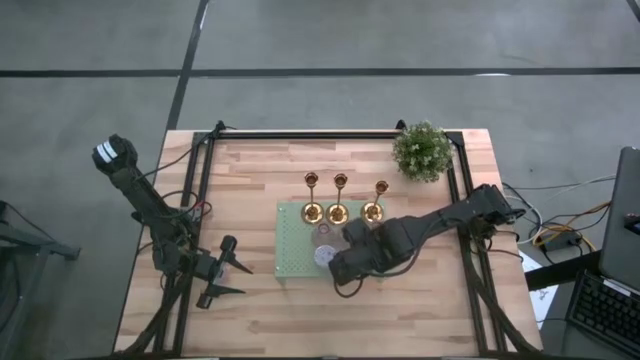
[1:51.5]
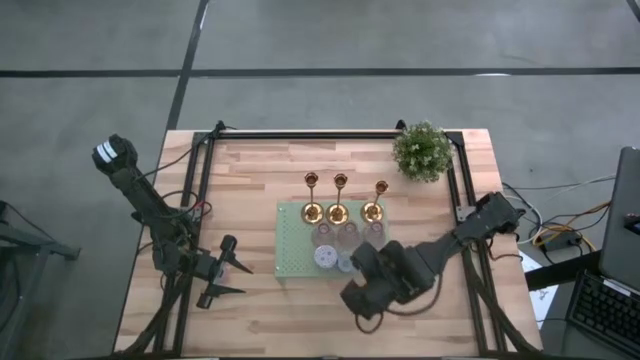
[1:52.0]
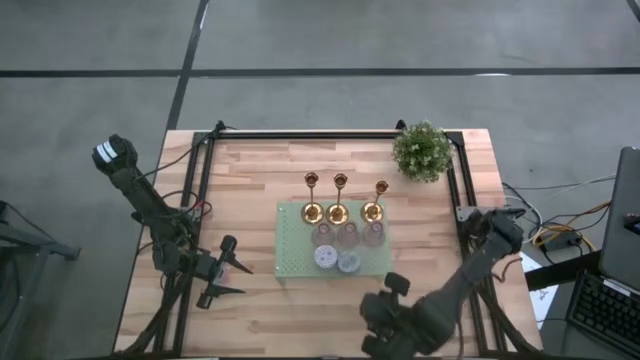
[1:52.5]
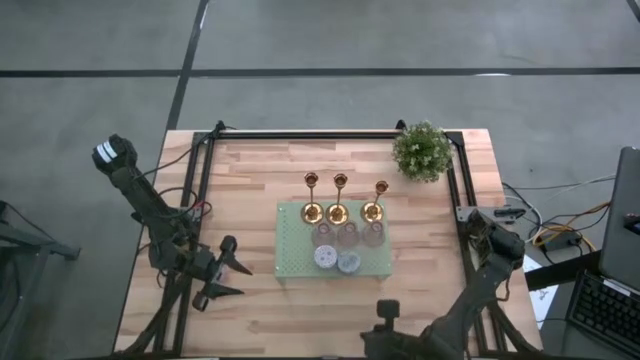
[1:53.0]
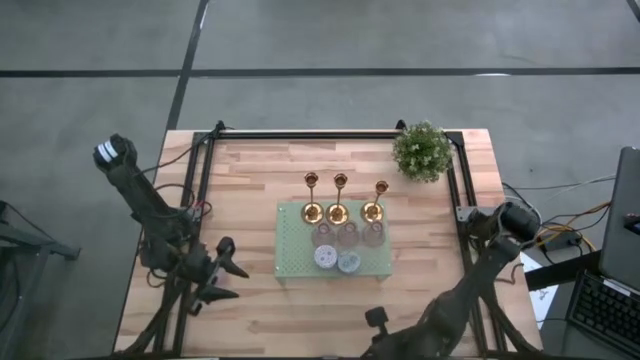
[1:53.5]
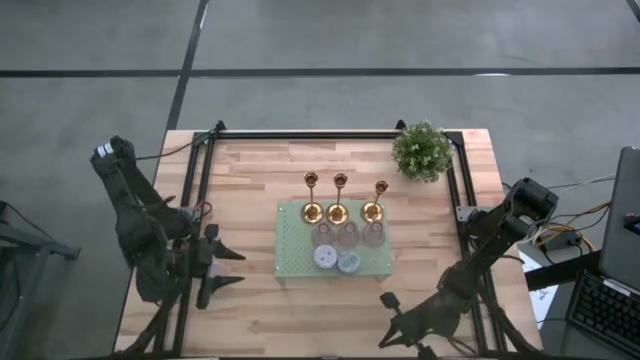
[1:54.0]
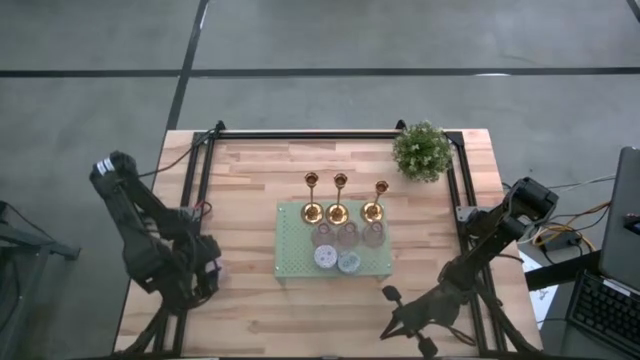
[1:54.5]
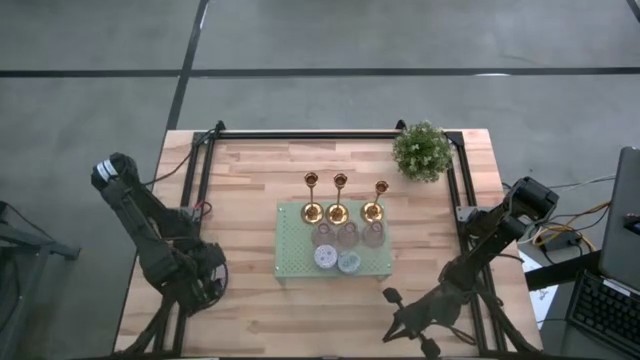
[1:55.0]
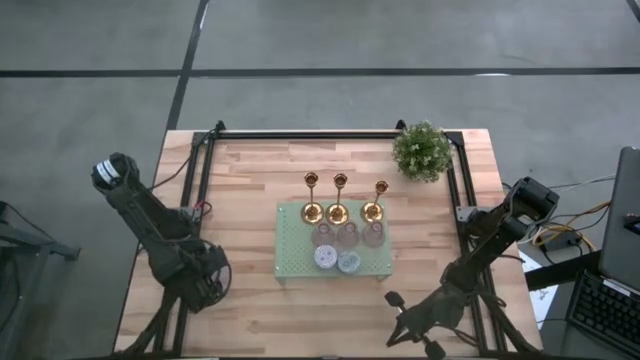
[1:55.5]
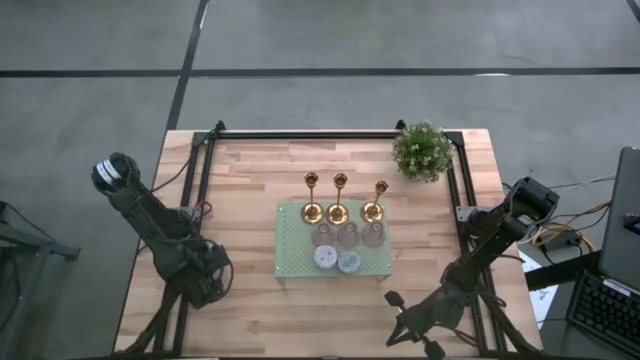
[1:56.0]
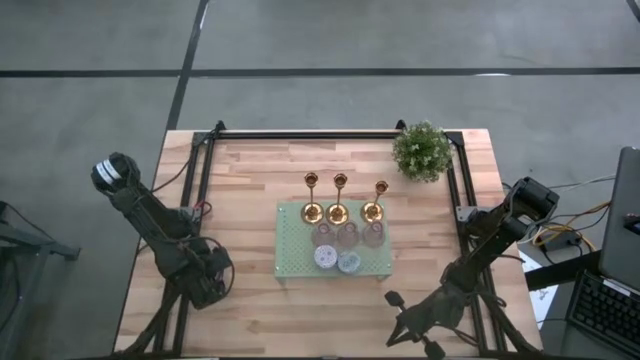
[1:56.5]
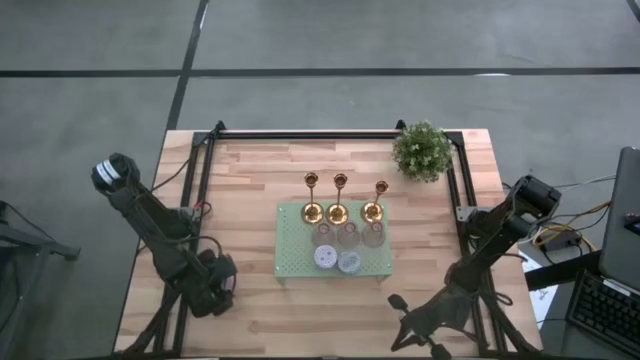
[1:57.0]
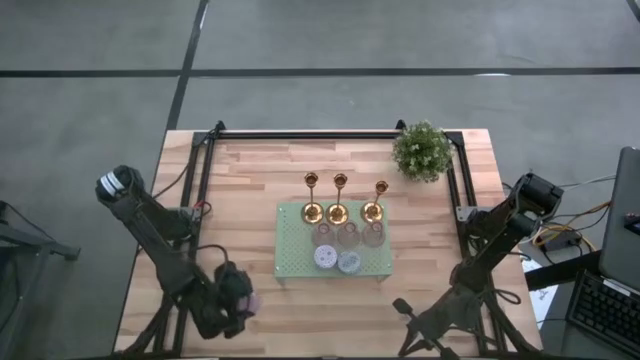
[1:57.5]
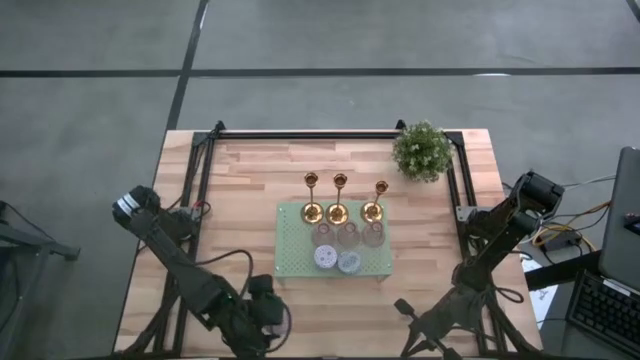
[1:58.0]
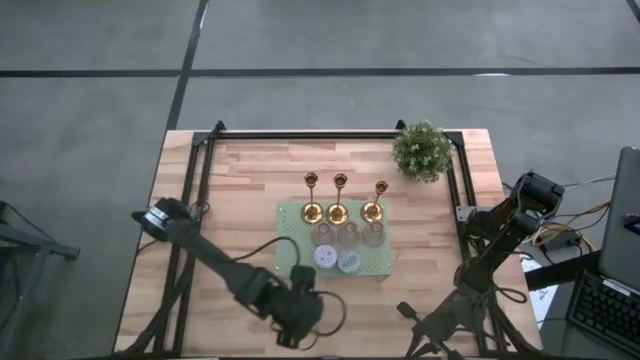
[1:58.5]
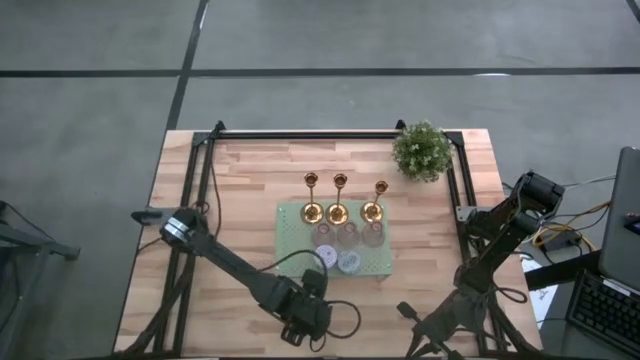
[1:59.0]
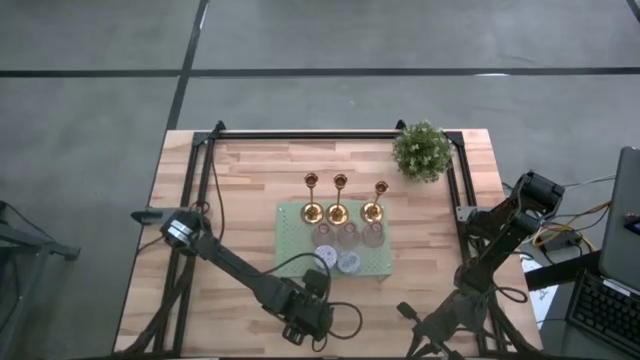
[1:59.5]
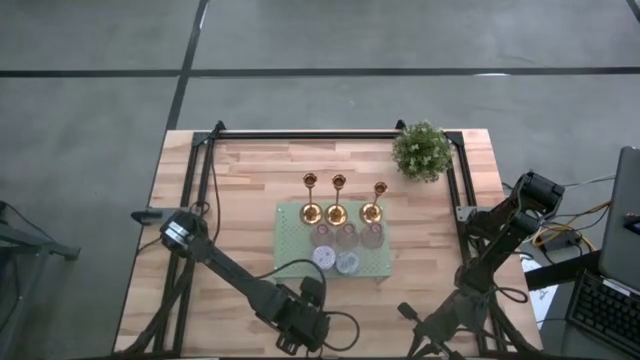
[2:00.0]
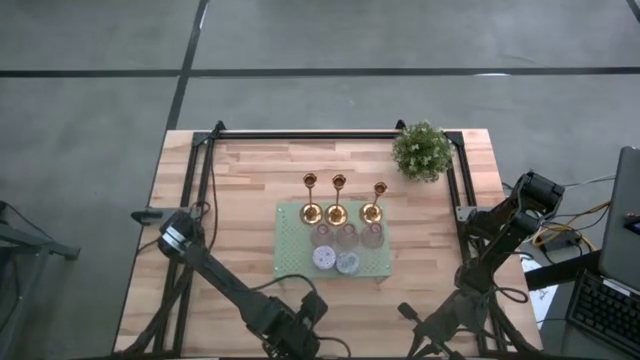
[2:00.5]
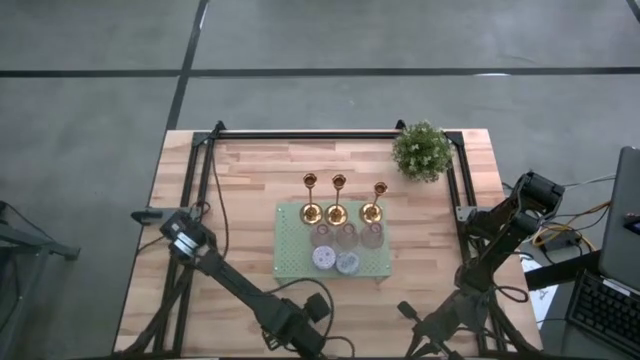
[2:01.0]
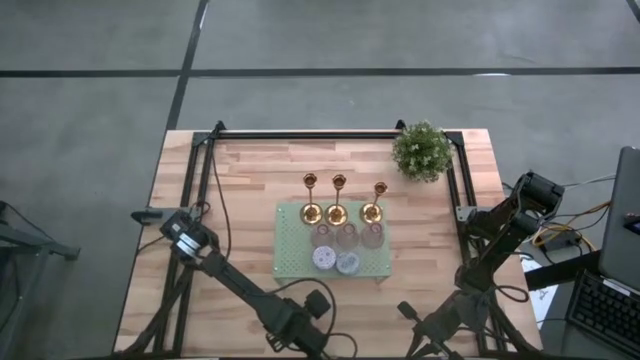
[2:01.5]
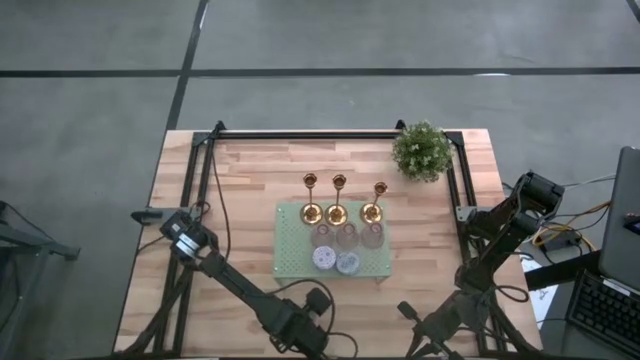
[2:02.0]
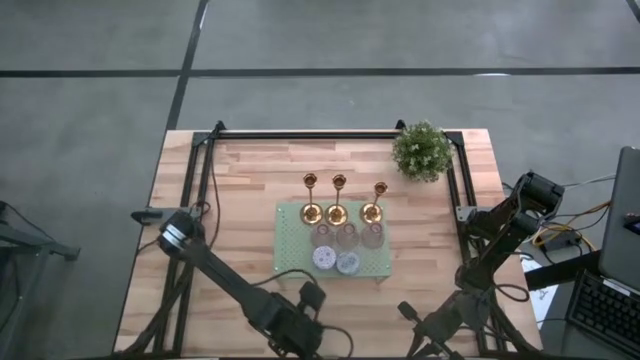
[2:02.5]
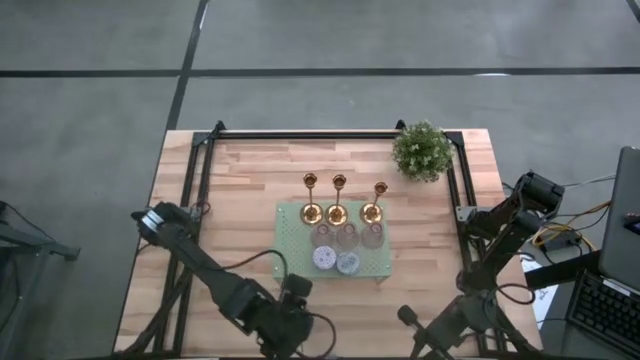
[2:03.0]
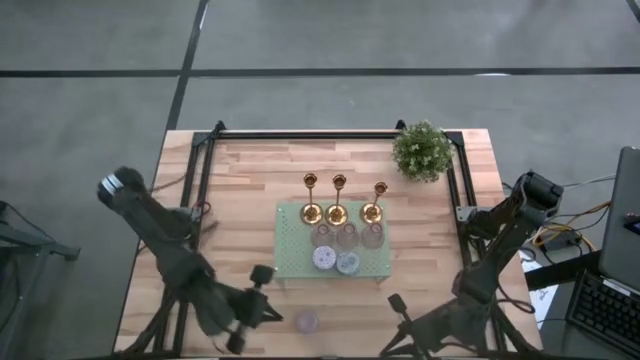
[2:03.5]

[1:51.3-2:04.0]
Task: Pick & Place candle stick holders
Put the pink scented candle on the shelf

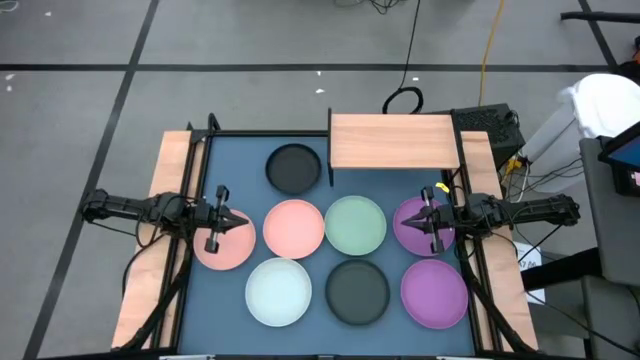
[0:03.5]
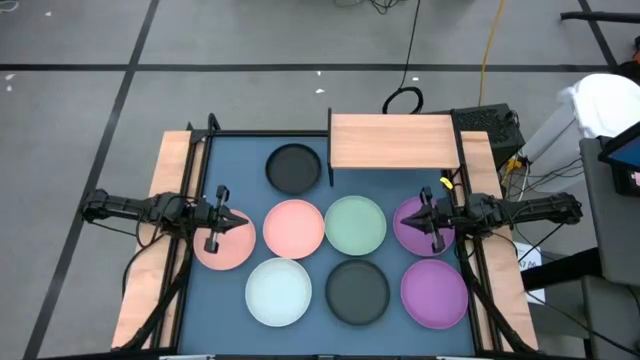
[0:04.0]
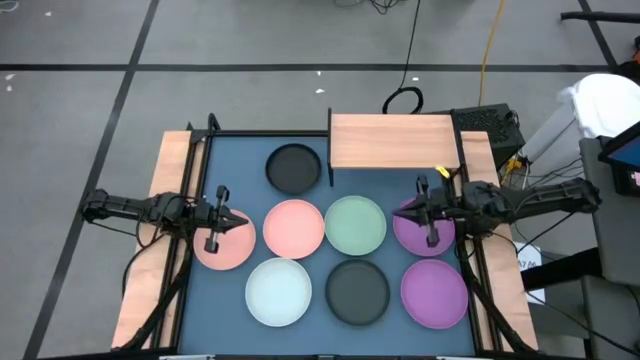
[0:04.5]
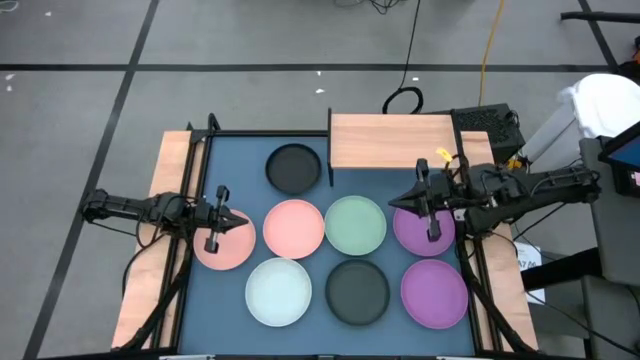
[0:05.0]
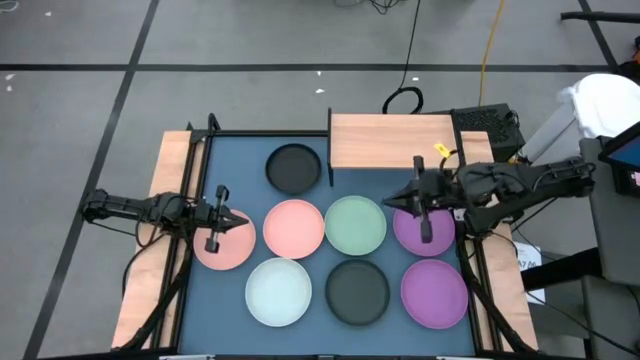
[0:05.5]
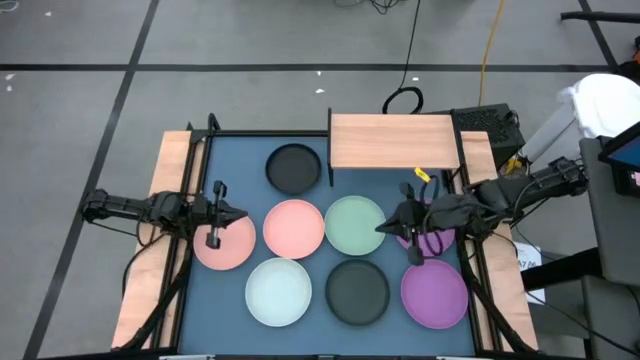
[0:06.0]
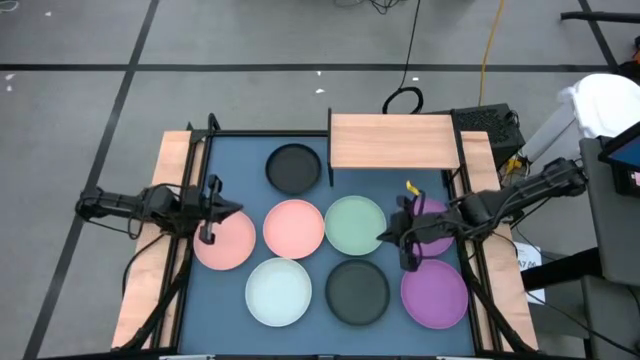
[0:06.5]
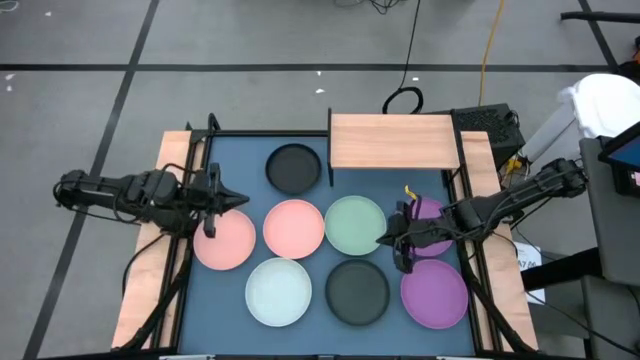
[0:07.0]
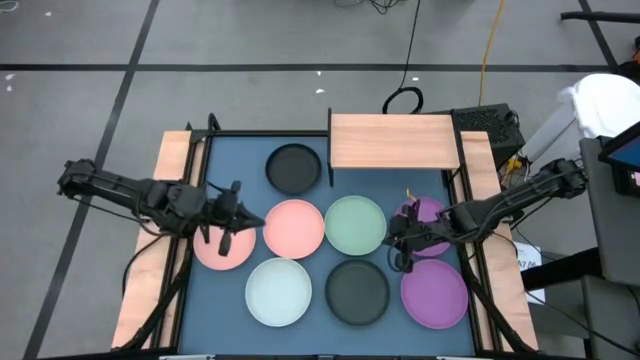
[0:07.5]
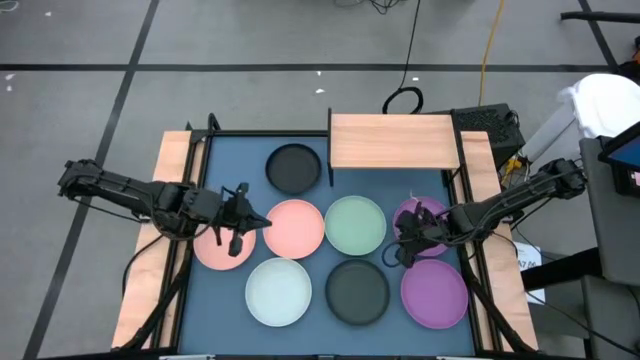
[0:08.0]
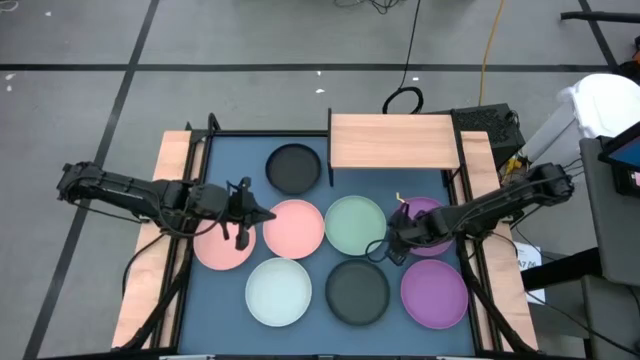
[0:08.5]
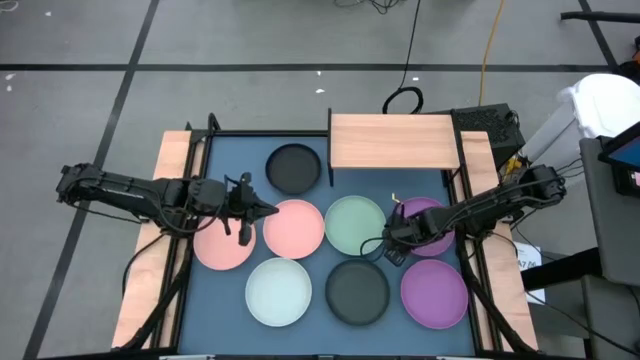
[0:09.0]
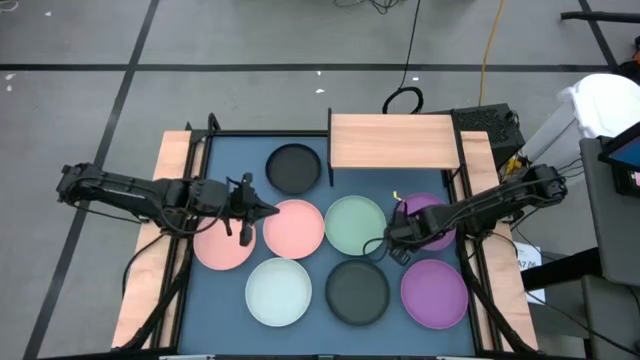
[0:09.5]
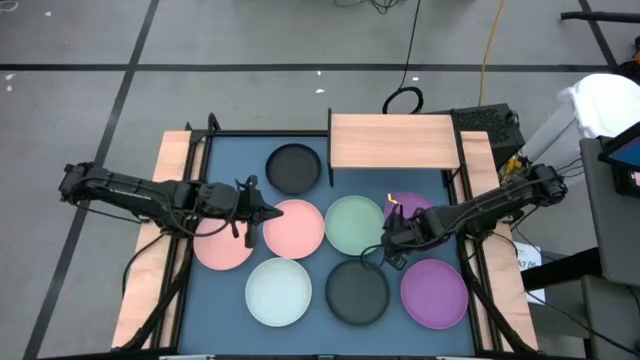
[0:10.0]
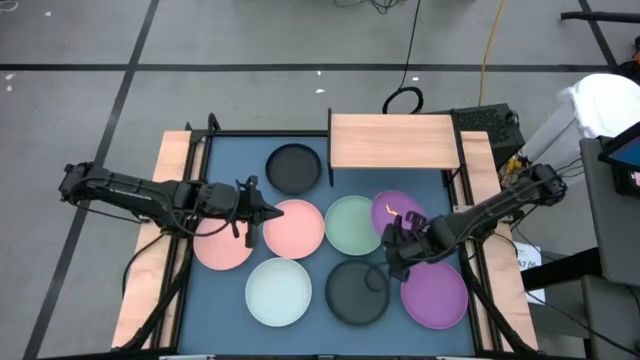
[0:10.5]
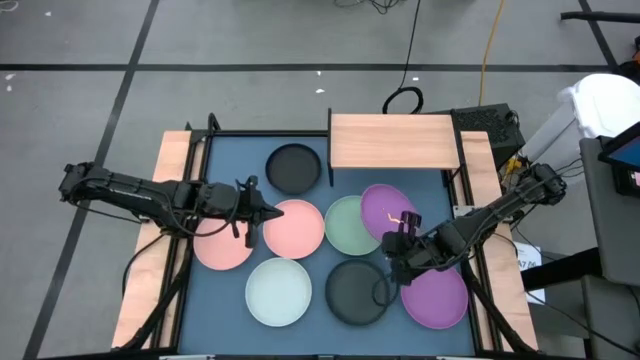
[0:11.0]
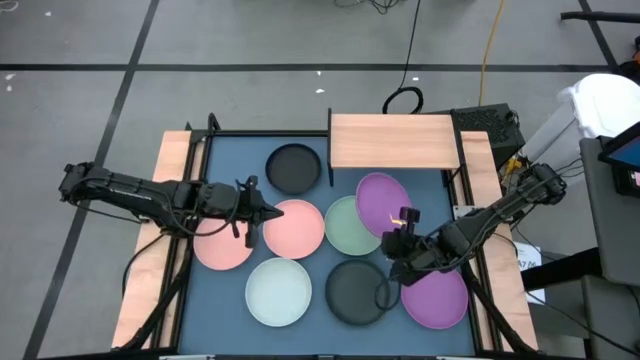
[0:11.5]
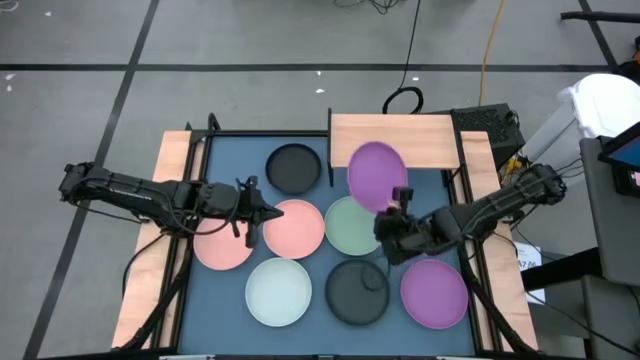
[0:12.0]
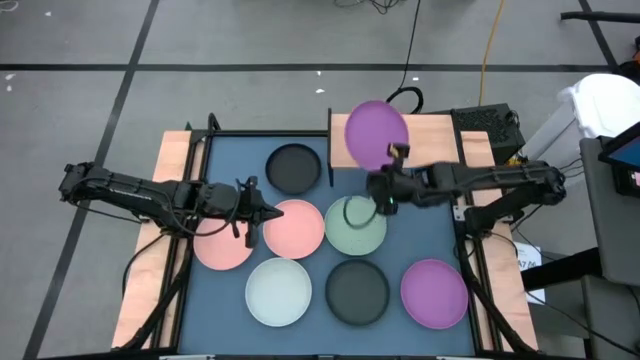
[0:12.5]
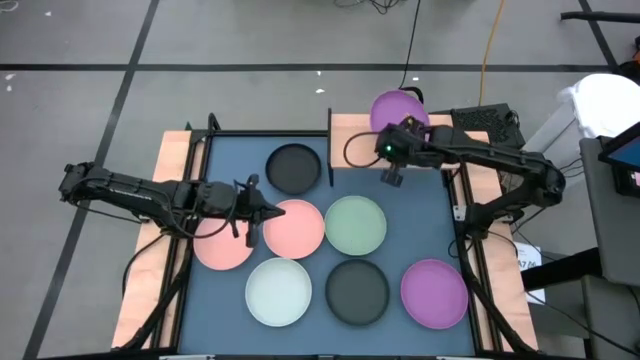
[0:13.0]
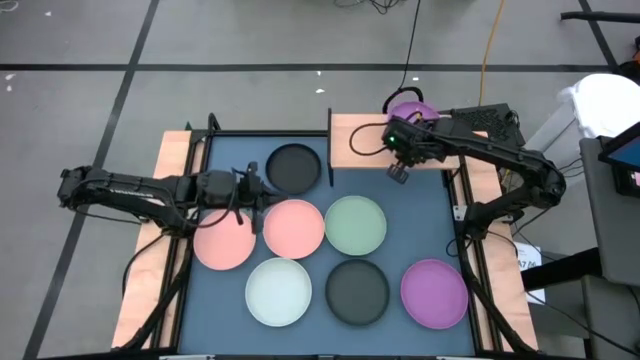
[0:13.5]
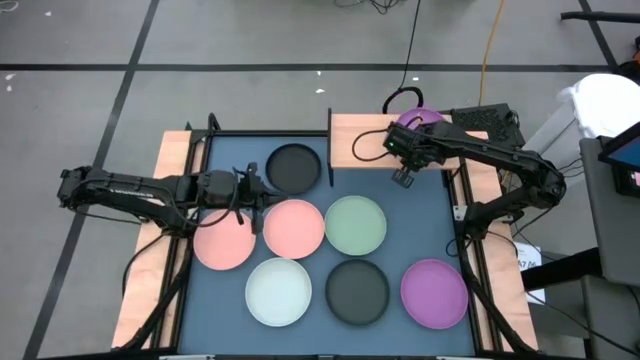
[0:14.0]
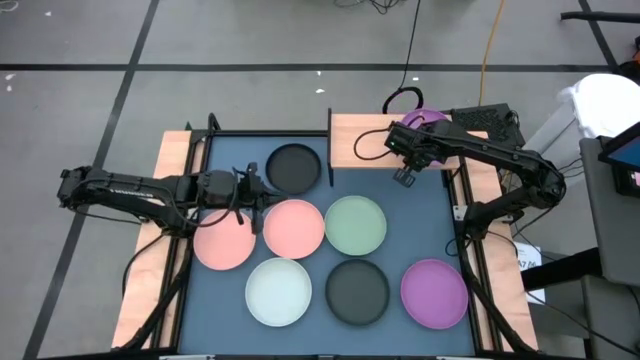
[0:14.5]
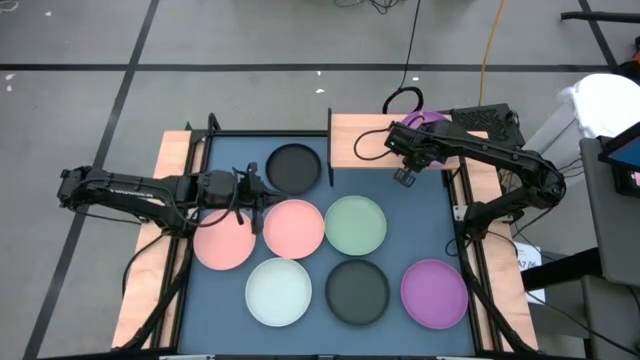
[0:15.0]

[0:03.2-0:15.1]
Task: Place and stack plates onto a shelf
Put the top purple plate on the shelf
